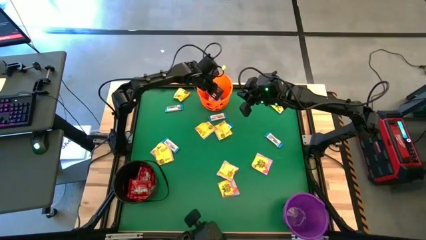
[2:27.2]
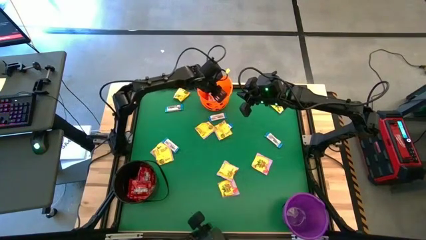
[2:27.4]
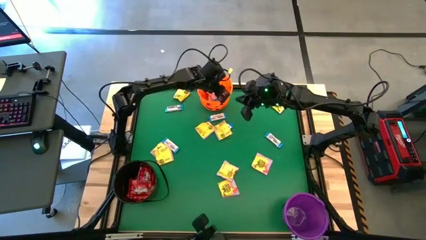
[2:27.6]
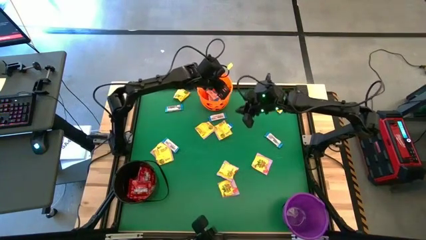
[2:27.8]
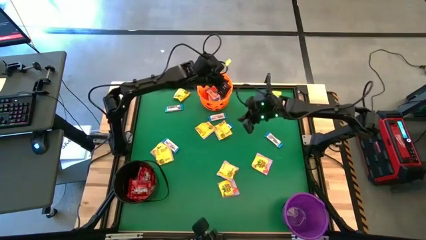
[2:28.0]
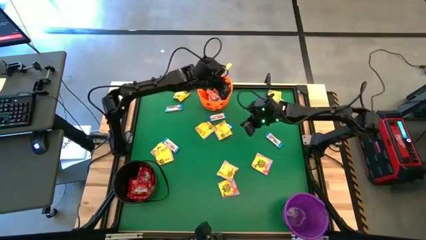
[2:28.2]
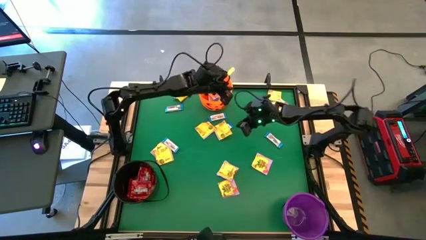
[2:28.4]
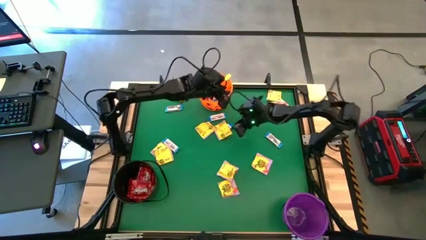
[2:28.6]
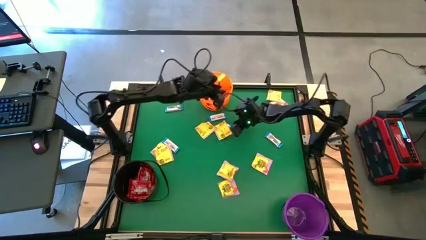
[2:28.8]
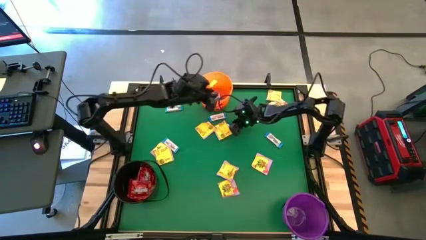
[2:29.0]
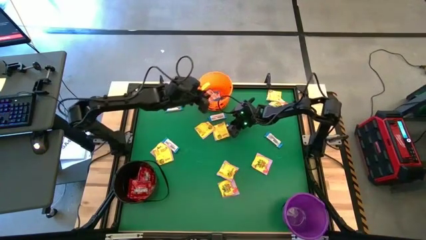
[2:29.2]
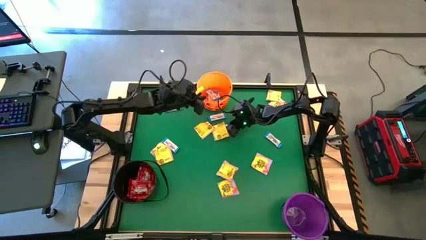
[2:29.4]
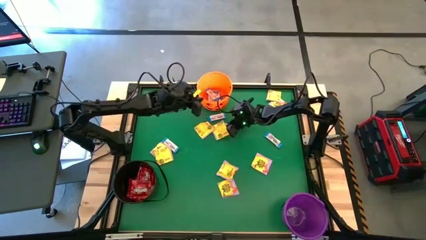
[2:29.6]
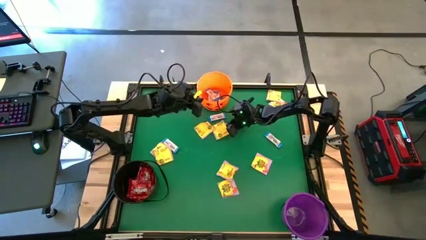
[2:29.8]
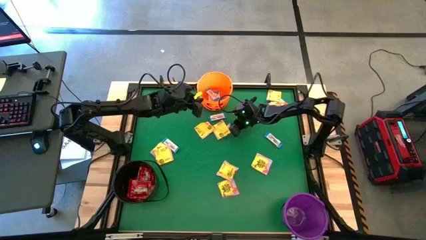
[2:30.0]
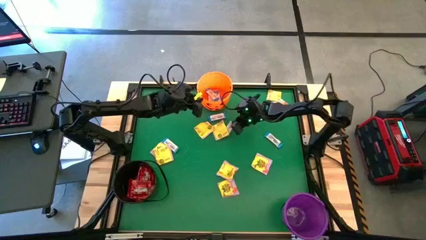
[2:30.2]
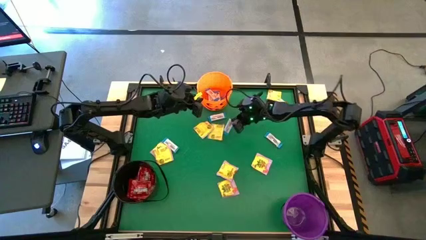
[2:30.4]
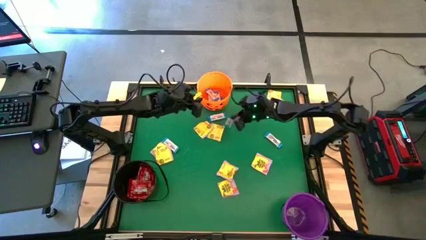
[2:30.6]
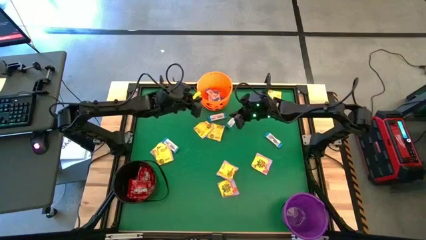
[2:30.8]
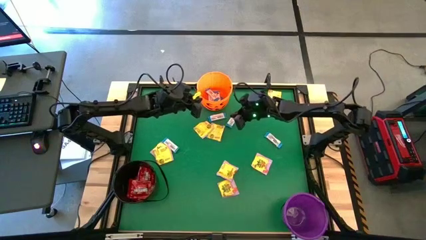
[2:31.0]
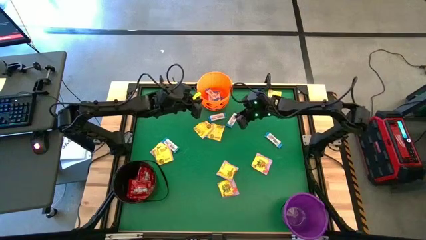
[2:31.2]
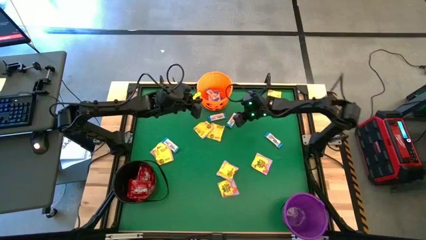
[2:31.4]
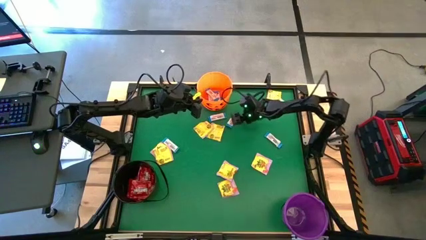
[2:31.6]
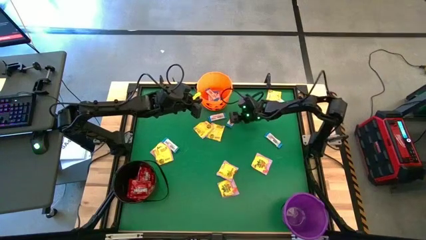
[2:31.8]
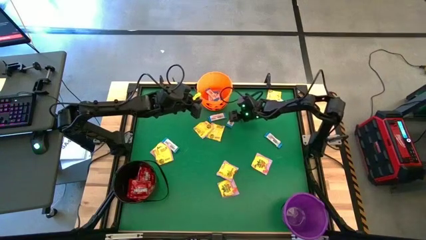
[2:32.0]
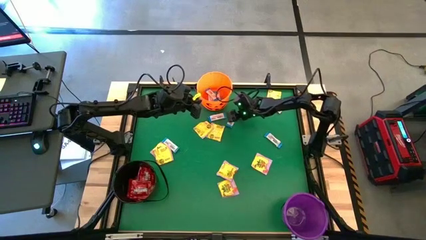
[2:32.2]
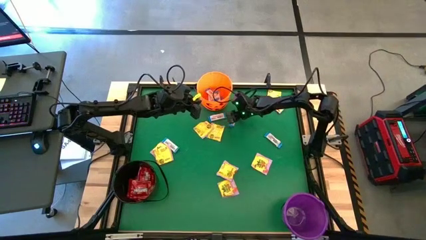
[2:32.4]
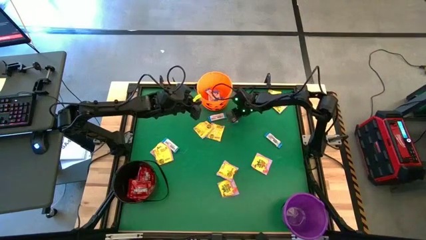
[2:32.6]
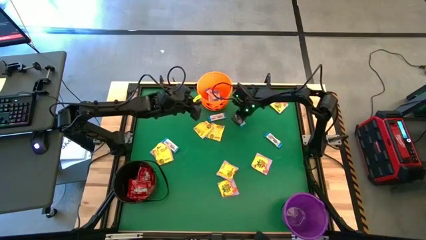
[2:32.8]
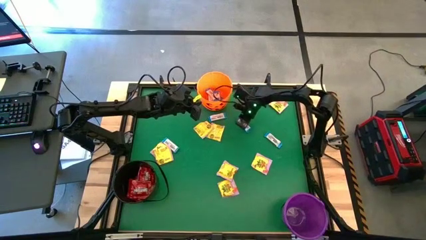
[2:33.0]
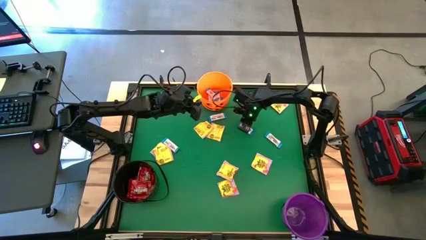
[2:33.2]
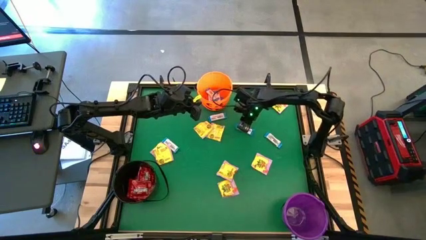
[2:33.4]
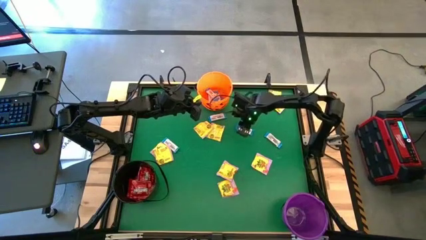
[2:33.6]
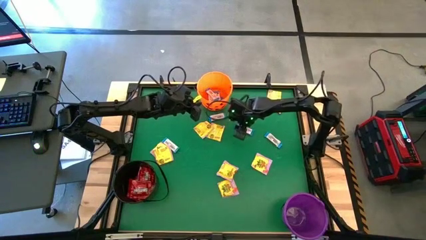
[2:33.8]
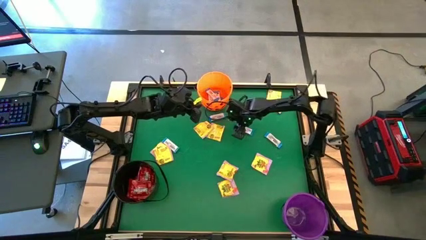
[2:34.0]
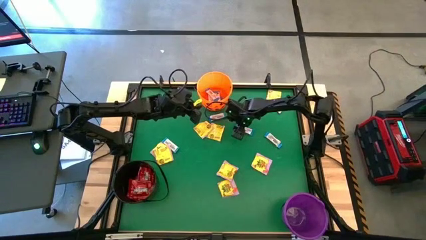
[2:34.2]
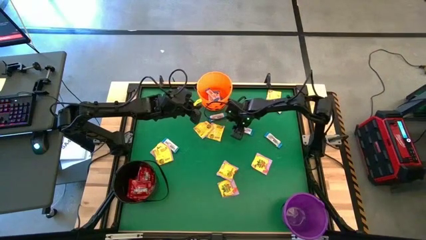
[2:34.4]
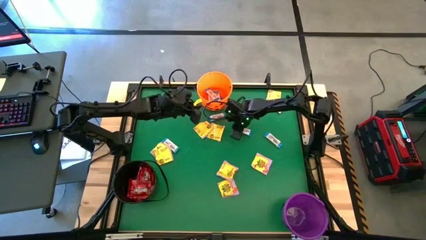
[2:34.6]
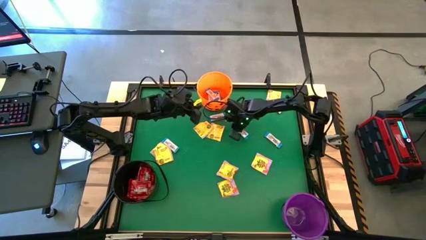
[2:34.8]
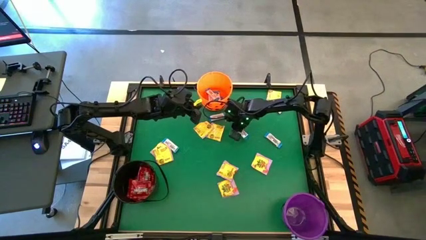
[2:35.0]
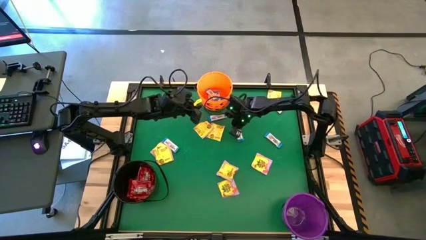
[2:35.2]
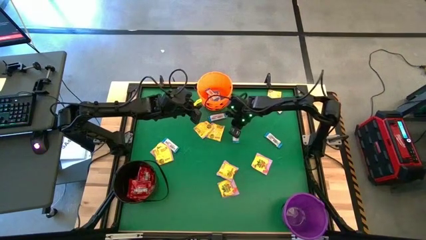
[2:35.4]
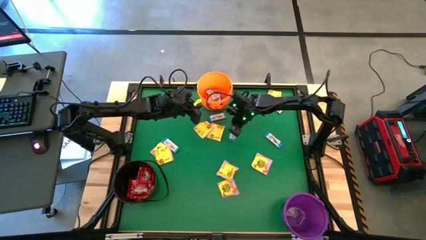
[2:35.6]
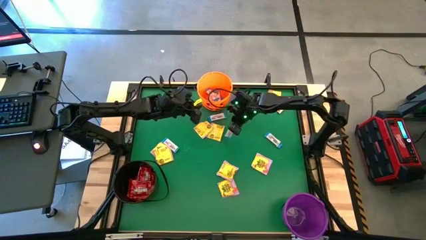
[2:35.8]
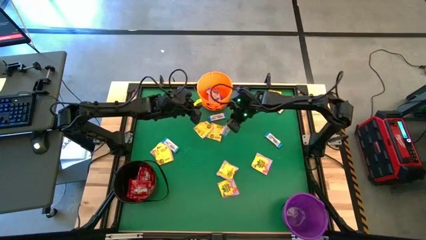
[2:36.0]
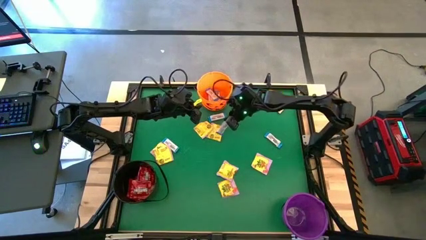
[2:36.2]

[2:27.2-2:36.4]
Task: Sort candy by brand, put in halloween buckets
Put the white chocolate into the orange bucket

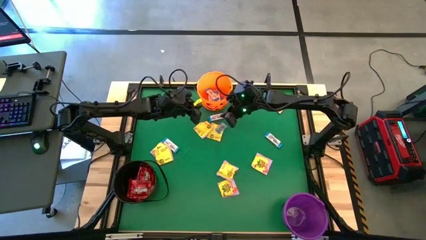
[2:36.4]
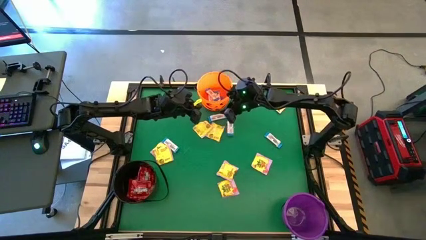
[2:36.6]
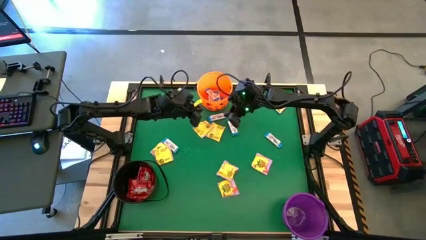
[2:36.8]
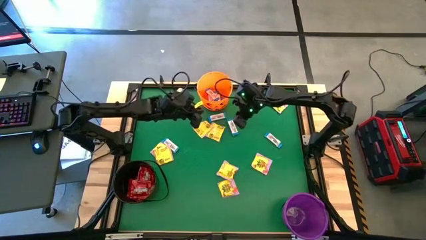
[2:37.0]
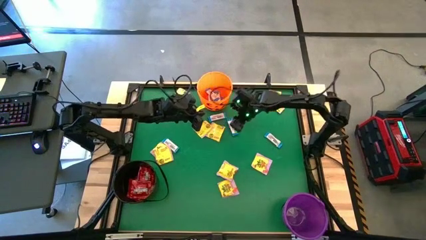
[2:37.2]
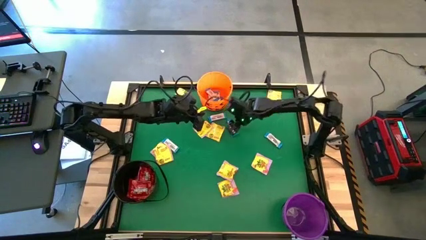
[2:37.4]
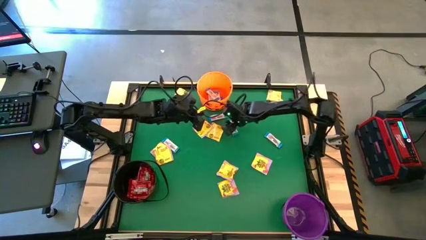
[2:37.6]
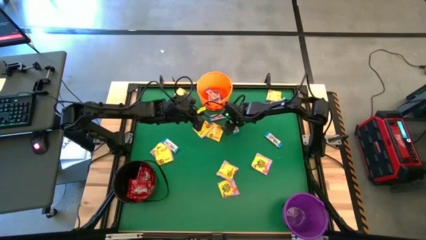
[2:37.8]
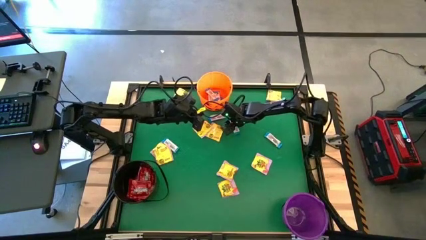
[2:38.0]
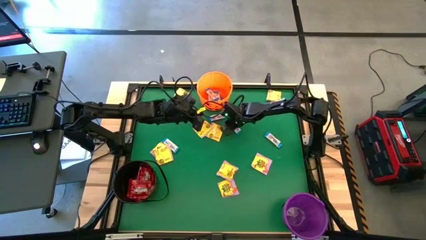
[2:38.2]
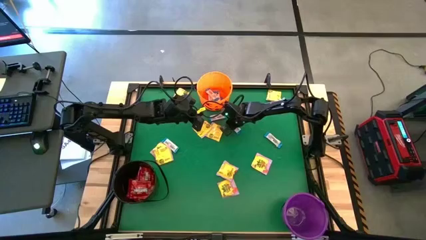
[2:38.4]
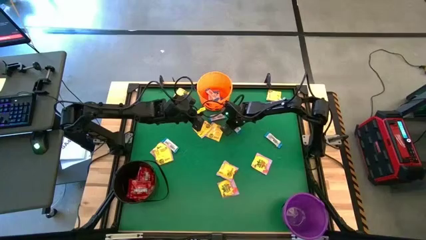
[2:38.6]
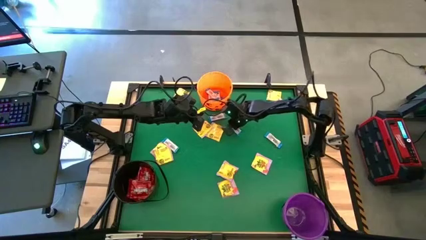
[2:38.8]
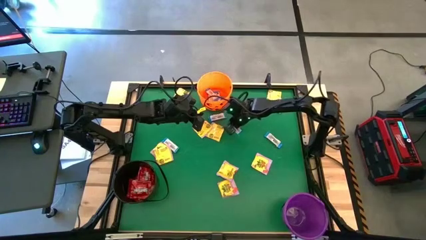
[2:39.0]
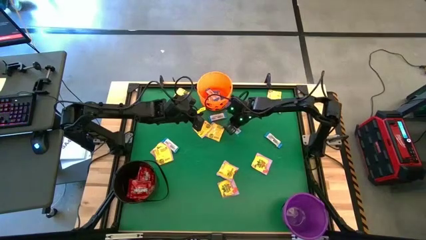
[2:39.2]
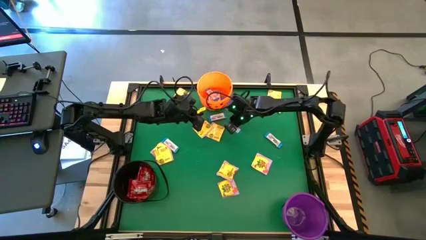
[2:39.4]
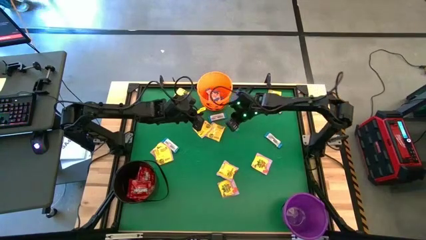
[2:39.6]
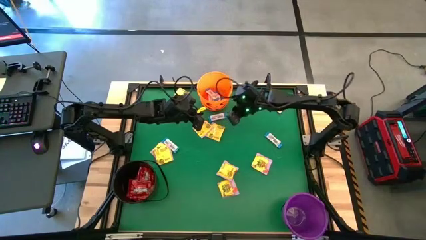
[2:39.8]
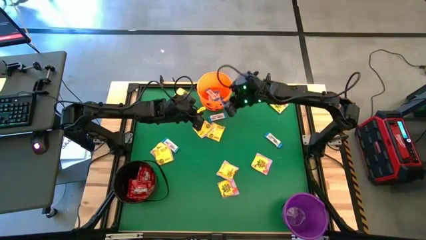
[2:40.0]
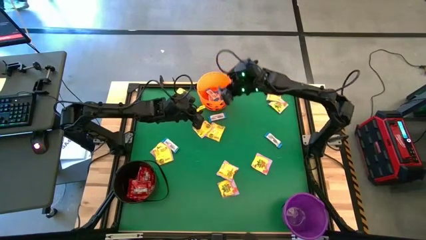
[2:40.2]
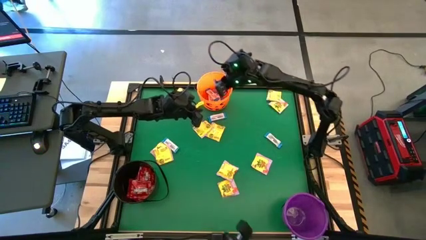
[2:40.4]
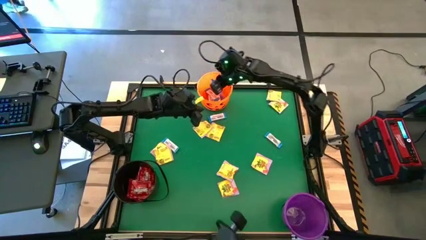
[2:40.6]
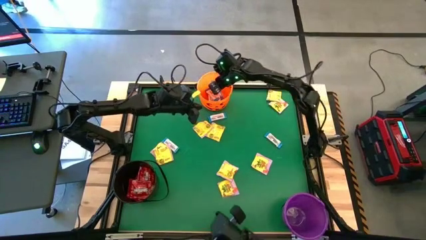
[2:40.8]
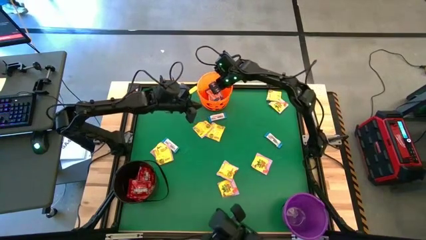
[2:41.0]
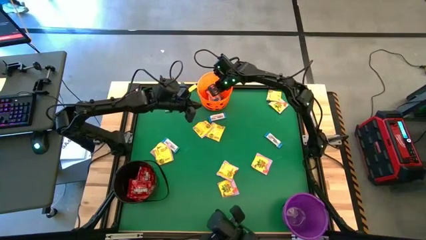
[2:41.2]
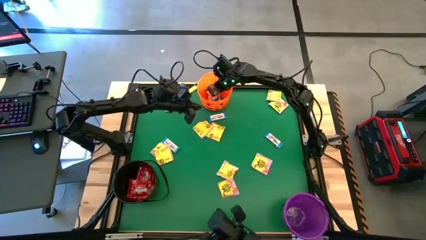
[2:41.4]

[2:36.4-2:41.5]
Put the white chocolate into the orange bucket

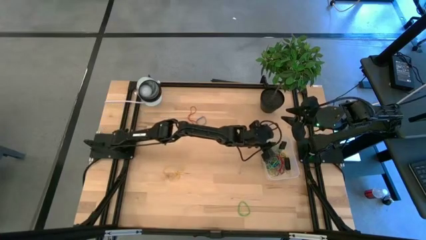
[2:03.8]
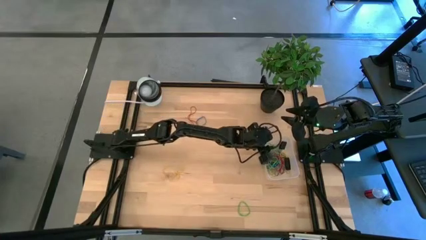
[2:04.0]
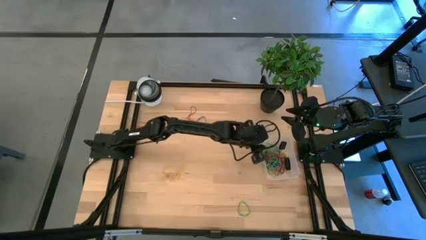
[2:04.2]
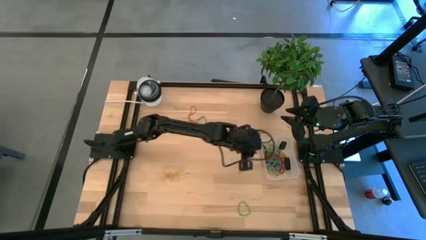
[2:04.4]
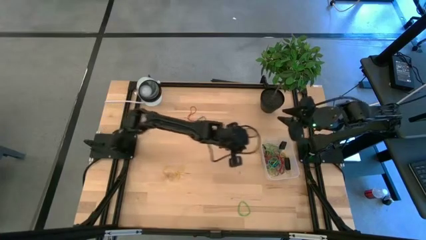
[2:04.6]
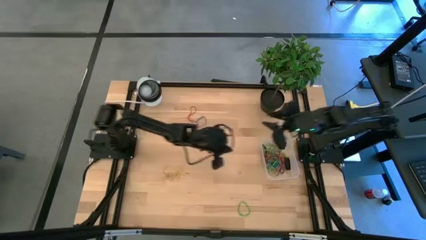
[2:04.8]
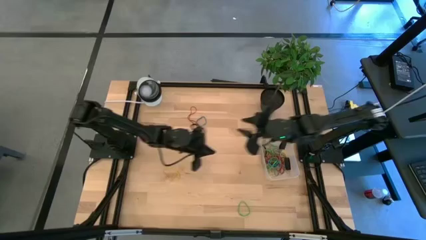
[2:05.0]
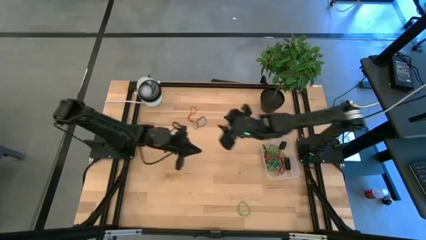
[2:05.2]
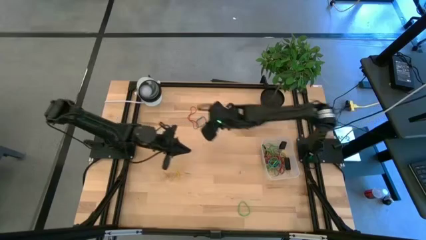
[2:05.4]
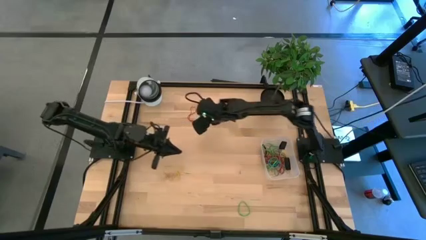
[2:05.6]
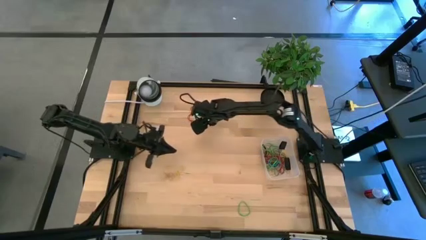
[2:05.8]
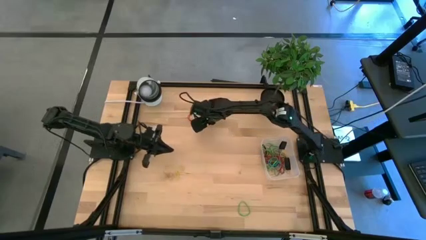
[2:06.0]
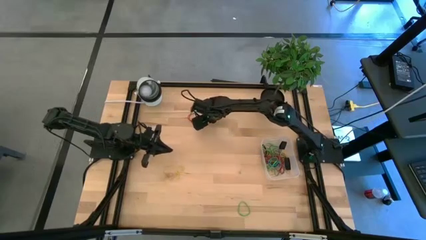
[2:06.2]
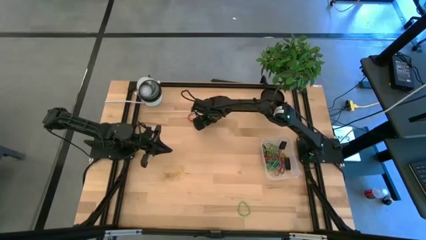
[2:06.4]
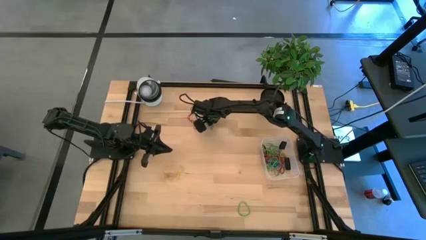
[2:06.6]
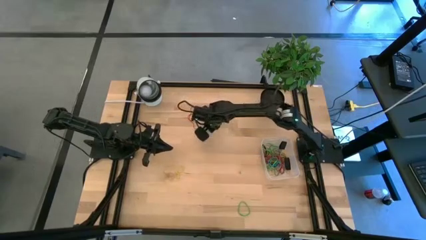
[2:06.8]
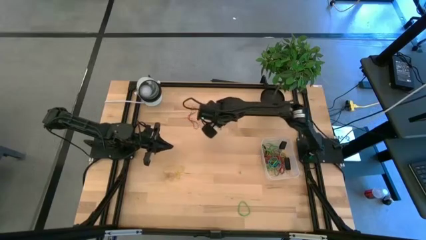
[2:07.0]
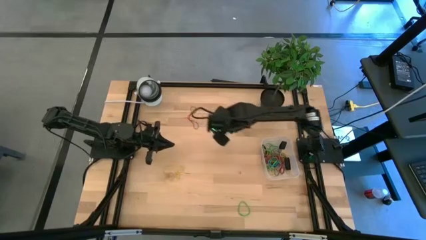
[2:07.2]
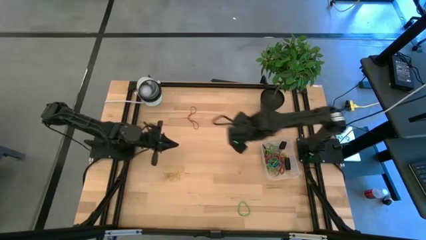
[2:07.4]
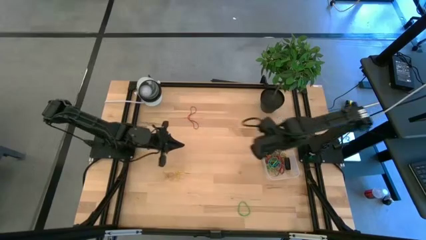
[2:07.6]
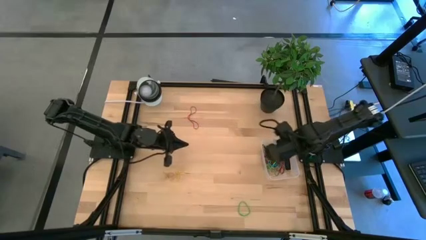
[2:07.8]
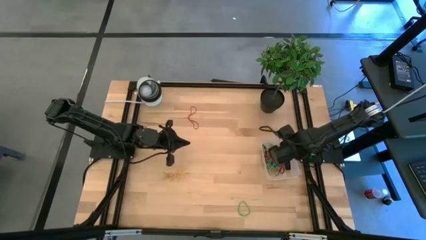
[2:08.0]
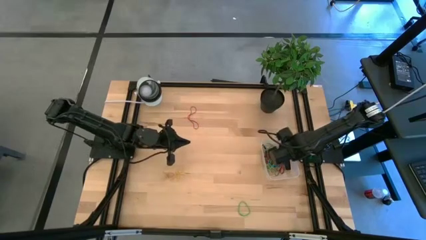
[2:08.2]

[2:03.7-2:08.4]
Task: Pick and place rubber bands into bin
Put the blue rubber band into the transparent bin
